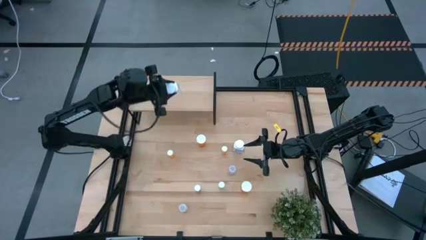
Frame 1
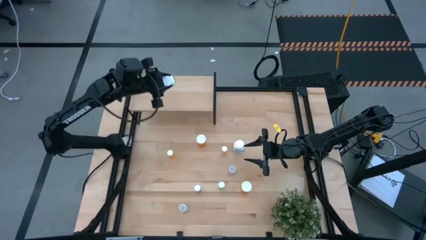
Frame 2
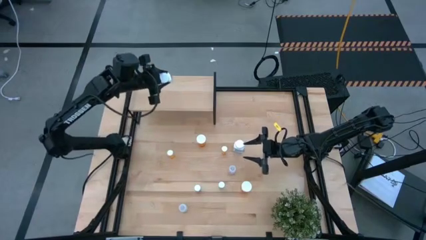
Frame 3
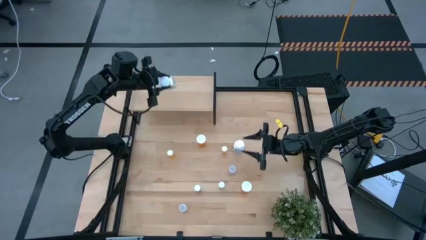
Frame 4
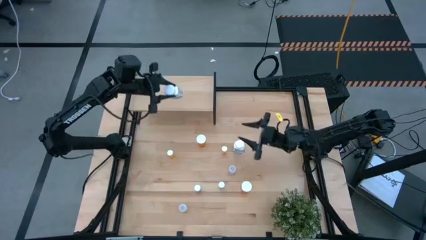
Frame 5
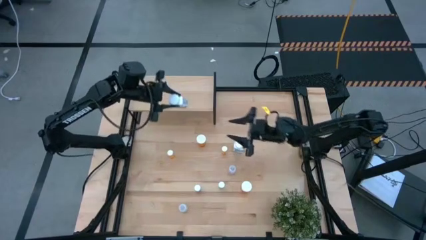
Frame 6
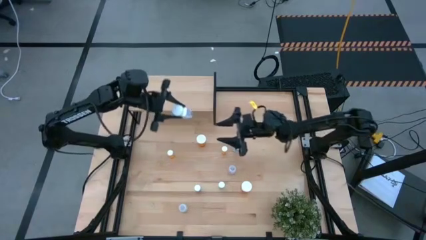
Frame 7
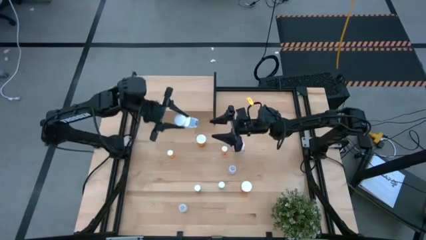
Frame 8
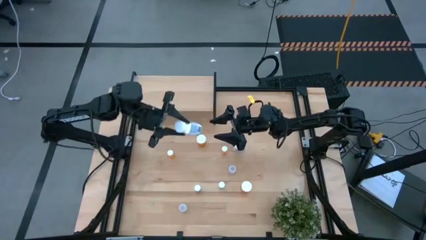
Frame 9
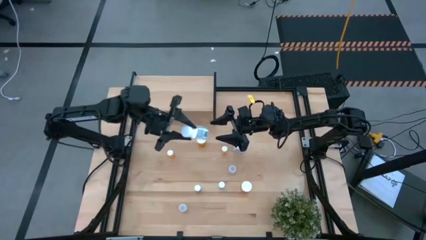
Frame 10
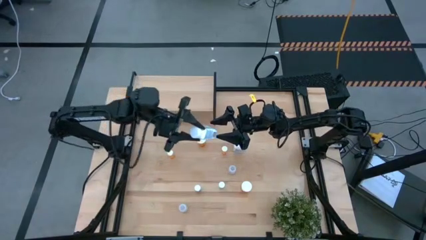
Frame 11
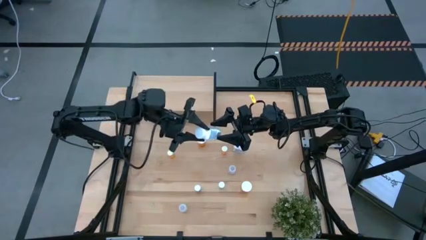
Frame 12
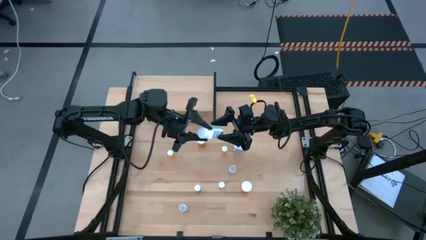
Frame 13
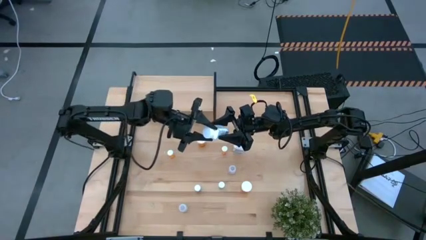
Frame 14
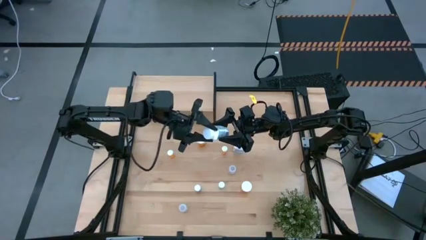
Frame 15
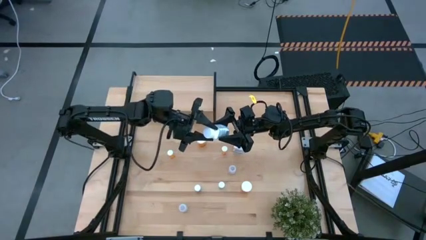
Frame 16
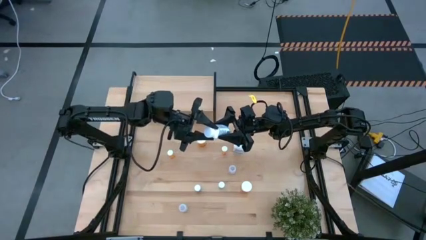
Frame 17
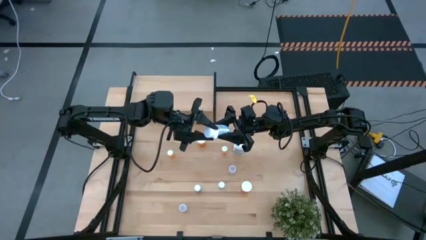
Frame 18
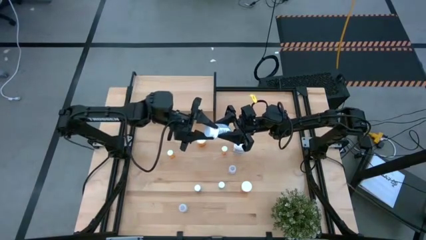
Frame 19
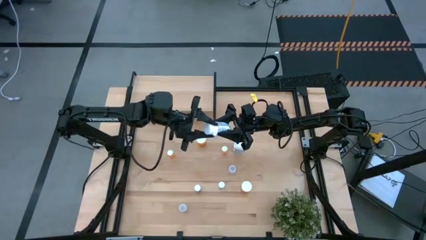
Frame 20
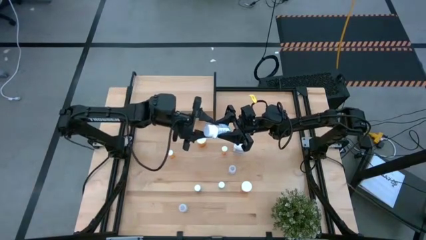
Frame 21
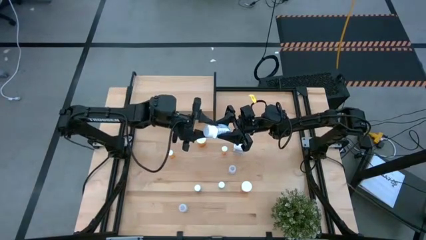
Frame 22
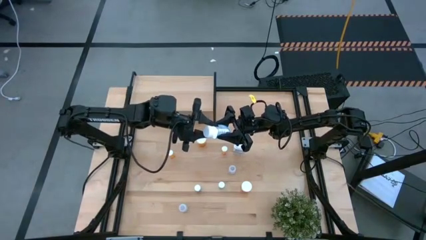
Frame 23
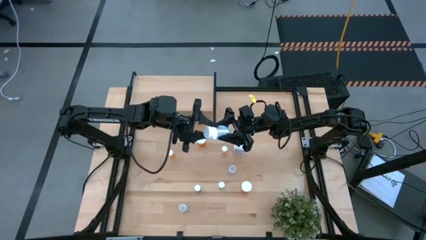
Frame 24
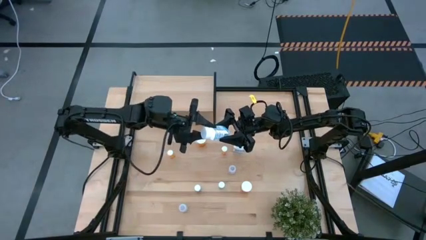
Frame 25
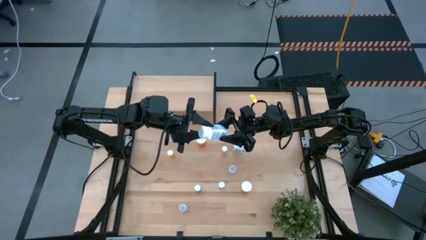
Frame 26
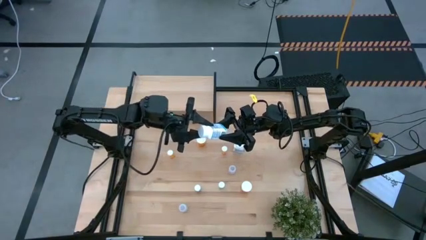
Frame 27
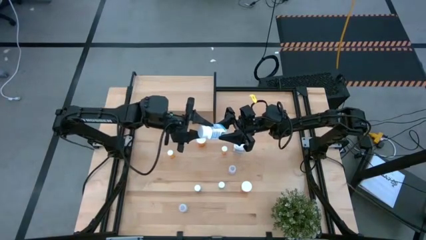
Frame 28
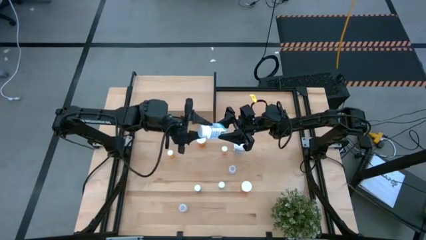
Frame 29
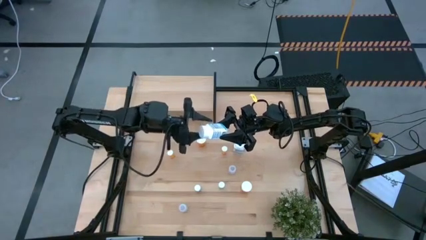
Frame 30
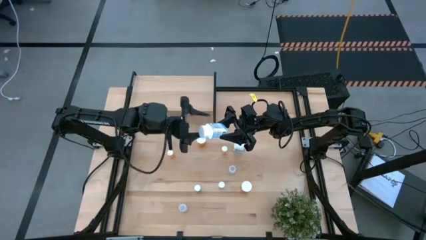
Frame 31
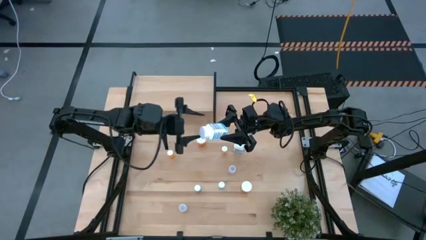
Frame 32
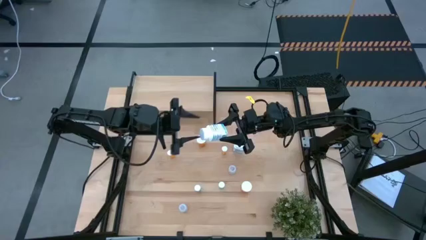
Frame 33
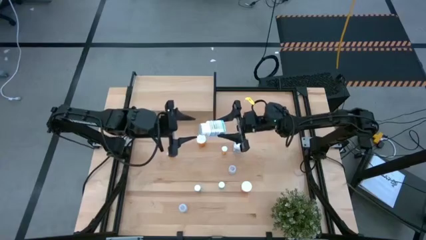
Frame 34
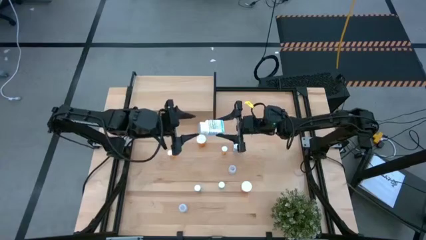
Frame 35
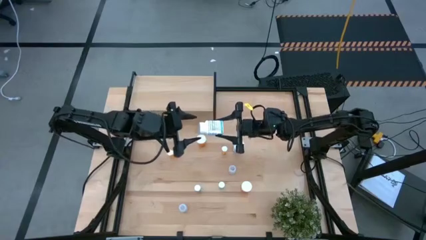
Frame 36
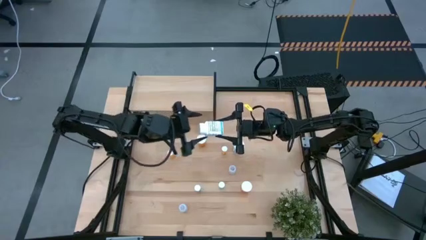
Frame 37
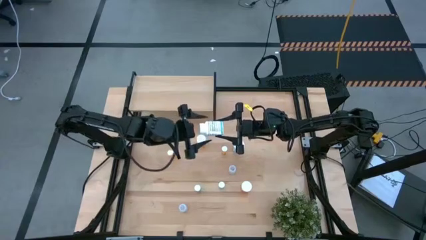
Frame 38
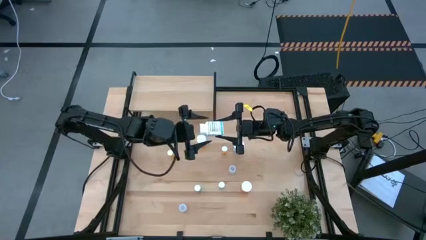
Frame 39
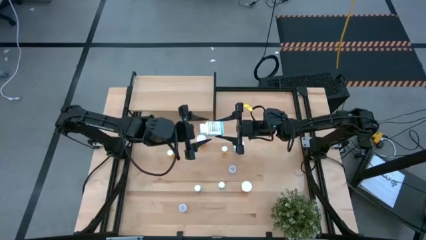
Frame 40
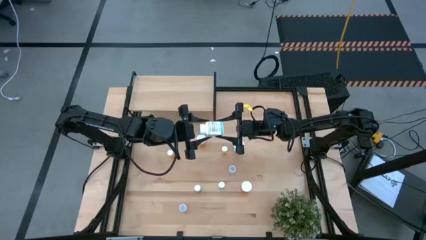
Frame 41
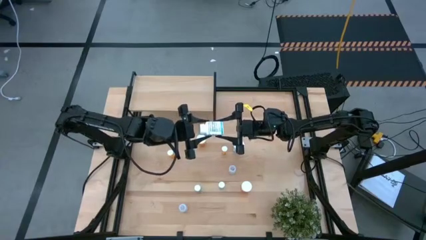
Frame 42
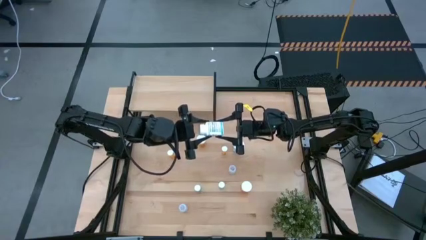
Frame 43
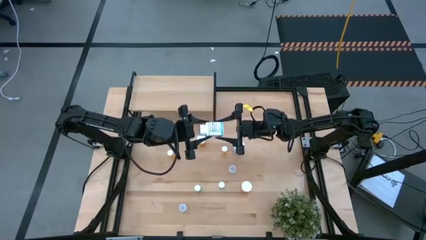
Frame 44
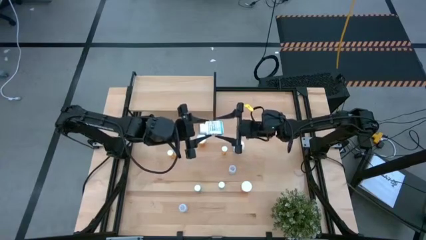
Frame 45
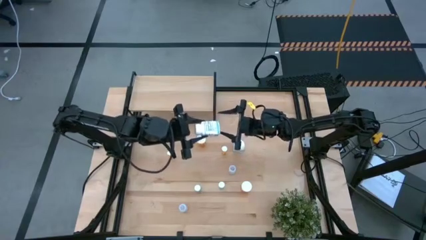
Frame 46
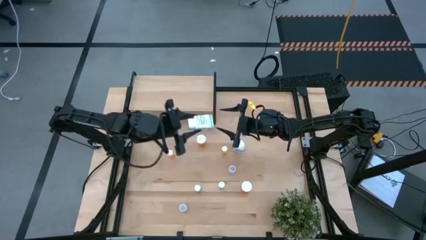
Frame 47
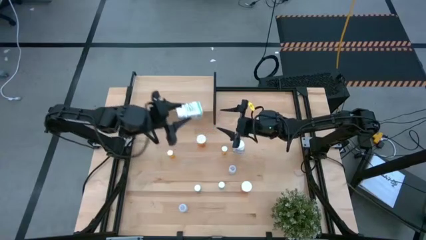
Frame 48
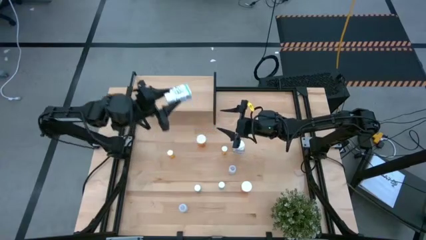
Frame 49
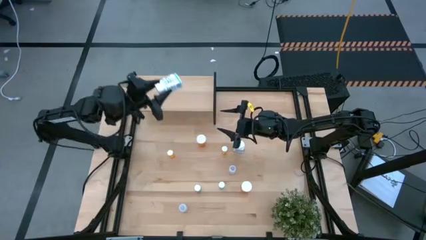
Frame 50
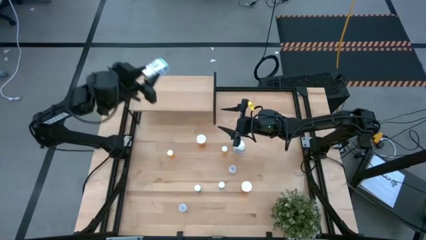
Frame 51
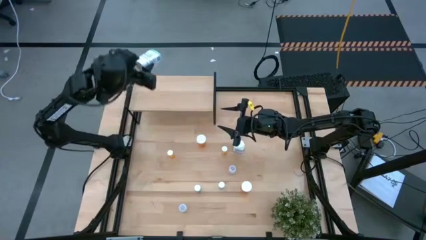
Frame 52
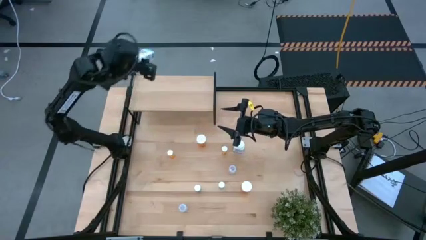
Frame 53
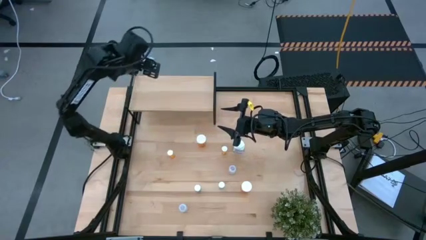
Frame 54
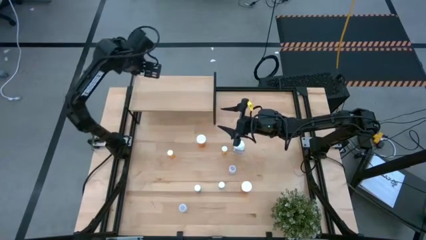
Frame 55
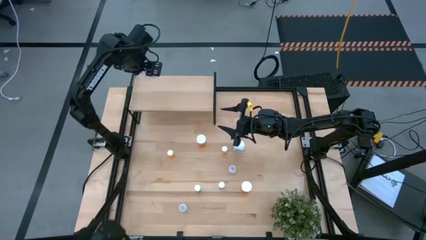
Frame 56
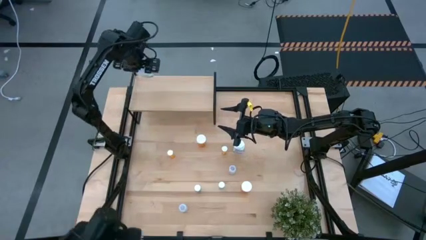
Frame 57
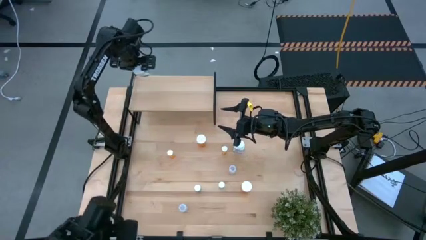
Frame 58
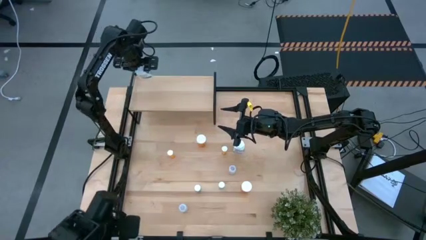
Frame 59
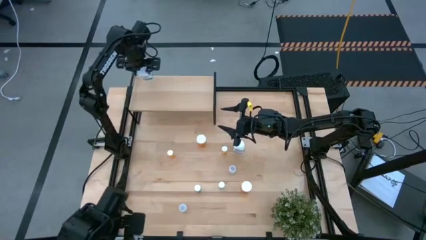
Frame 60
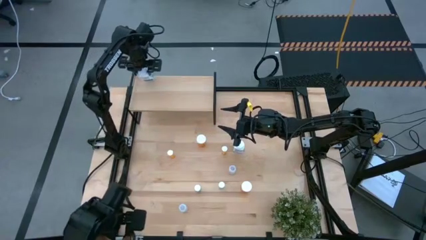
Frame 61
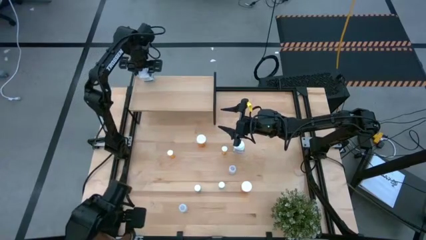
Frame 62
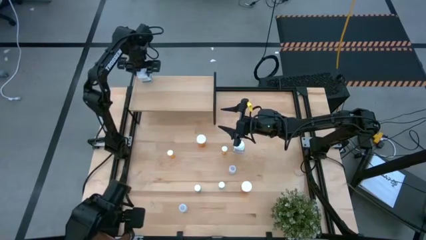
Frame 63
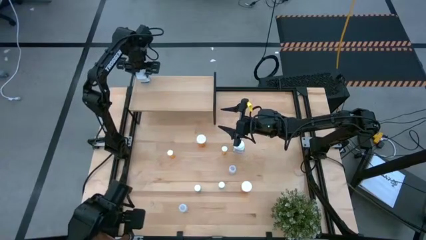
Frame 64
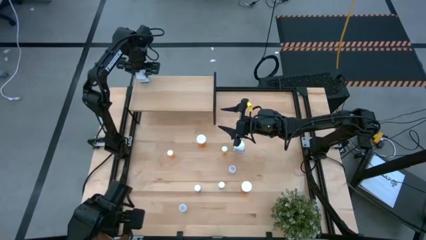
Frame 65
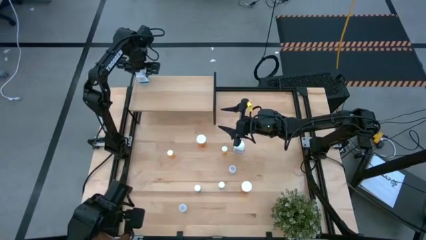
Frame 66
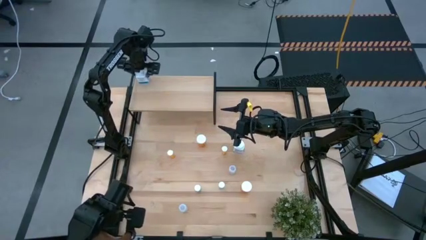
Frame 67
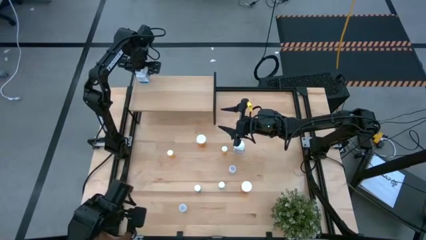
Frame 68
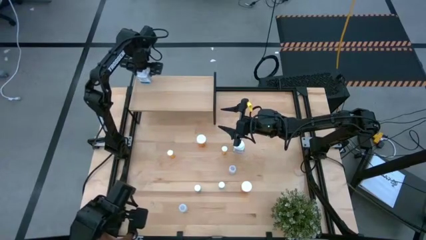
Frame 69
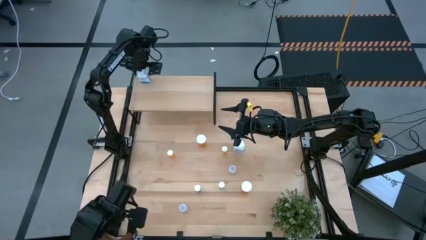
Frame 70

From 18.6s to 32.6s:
Task: Pick and place medicine bottles onto shelf by color
Put the bottom white pill bottle on the shelf
